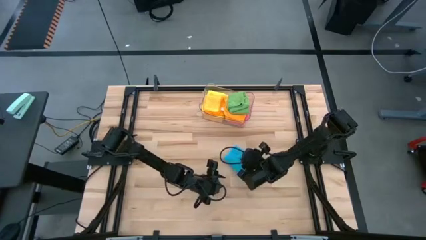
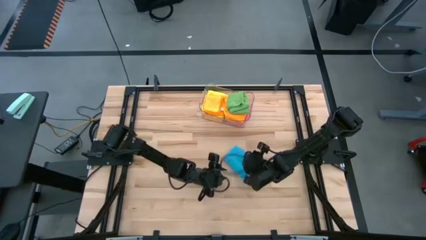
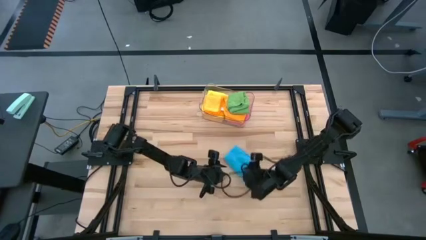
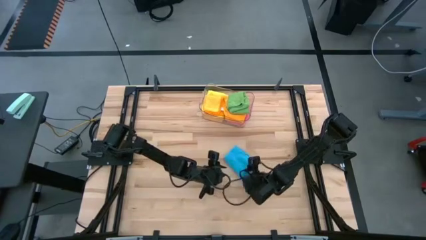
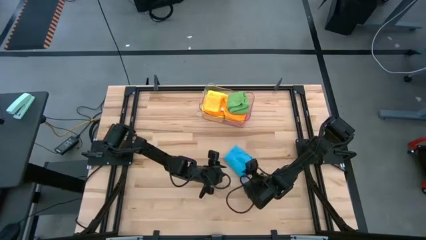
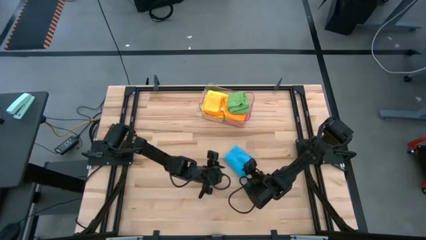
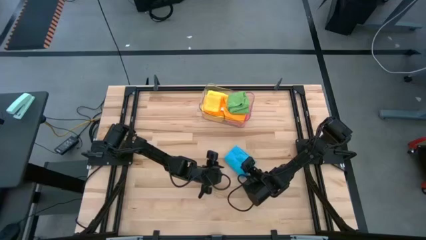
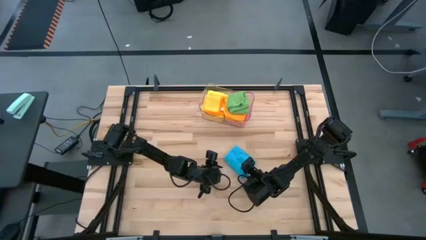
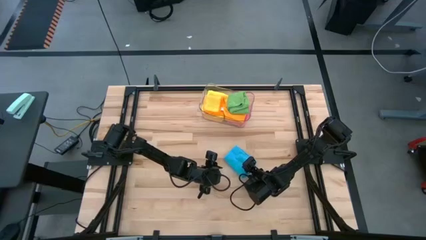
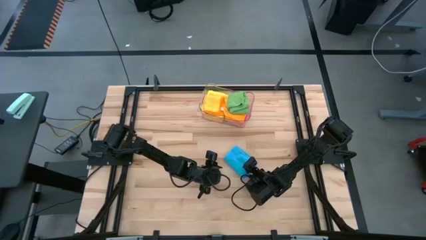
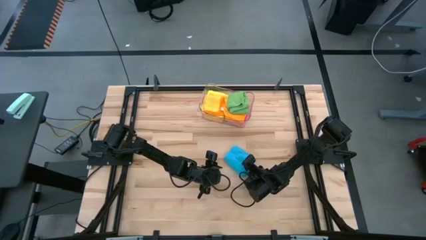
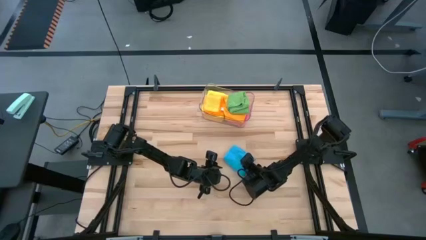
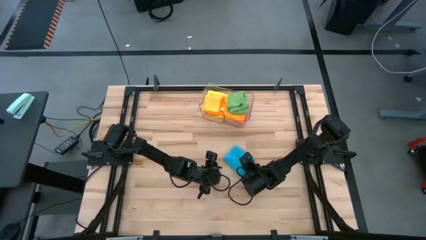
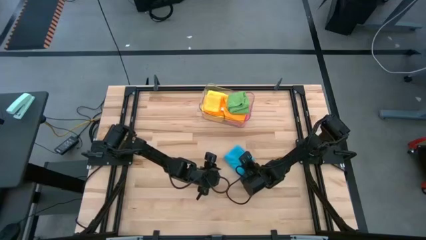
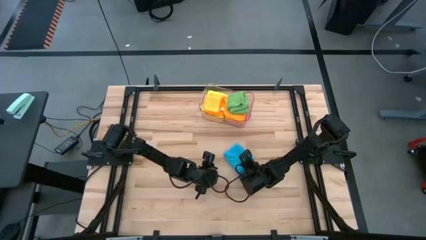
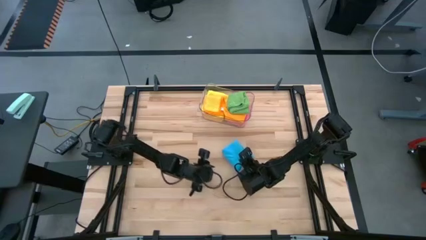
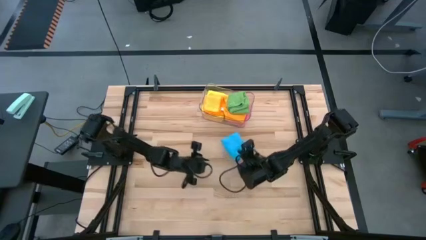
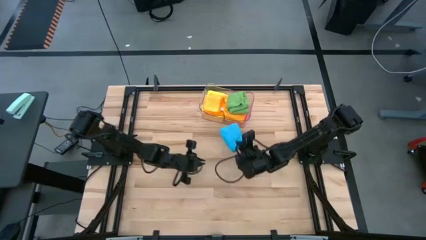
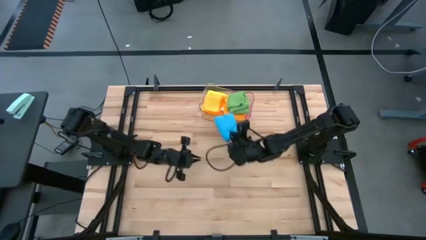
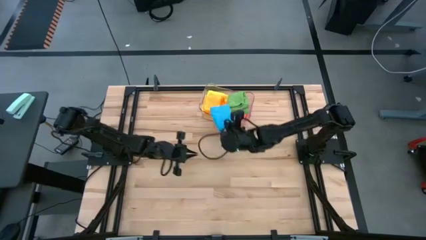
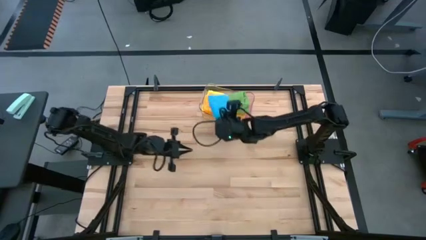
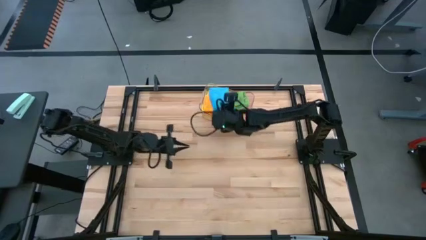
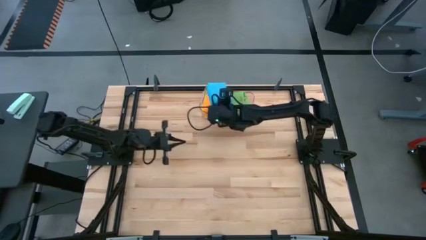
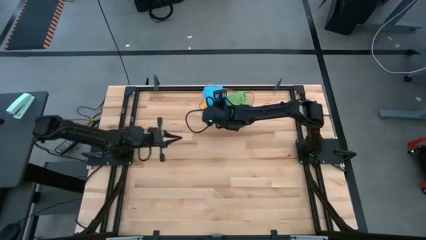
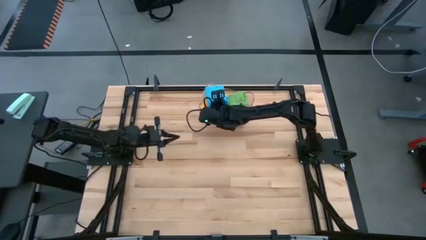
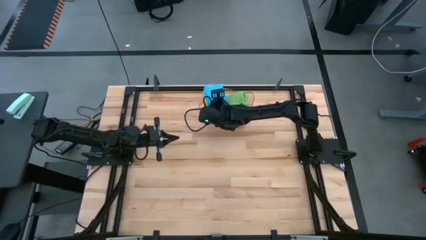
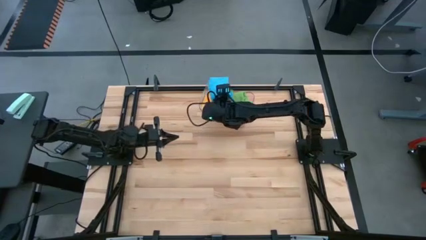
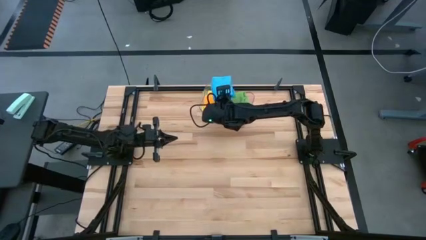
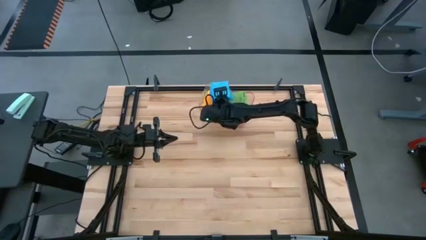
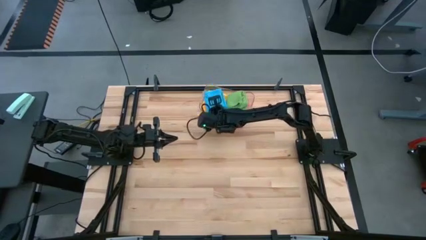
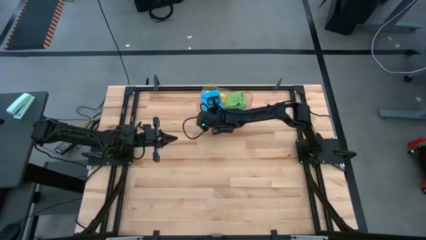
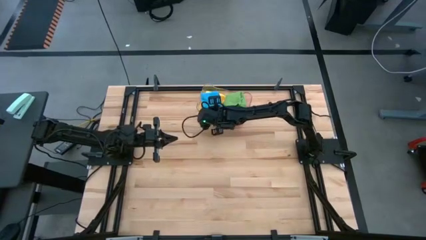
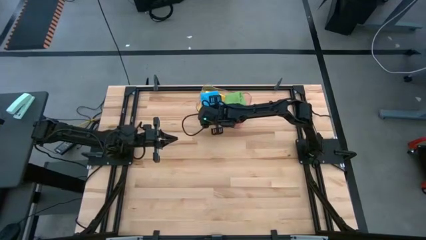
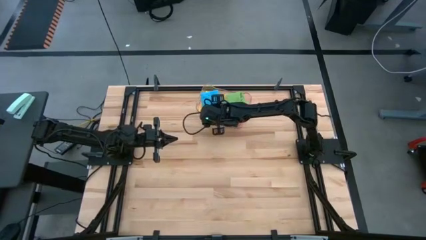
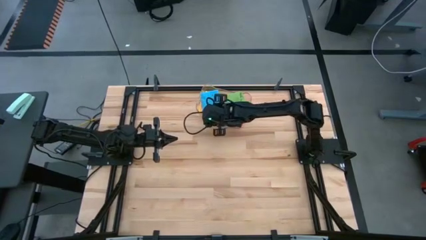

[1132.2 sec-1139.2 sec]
Task: Fold microfiber towels
Put the blue microfiber into the transparent bin

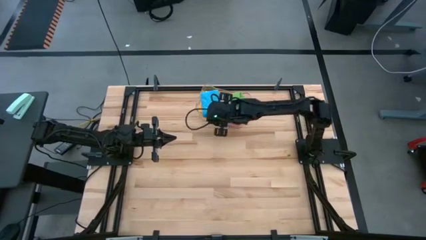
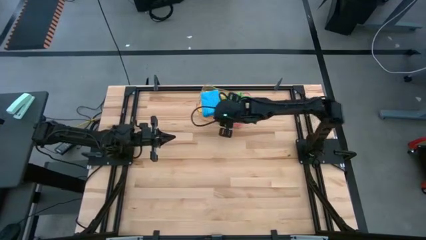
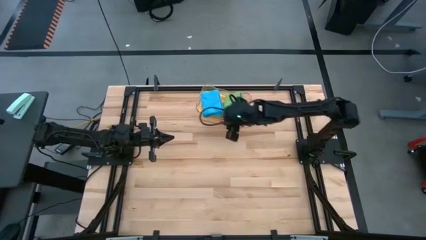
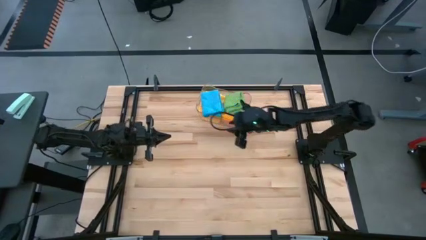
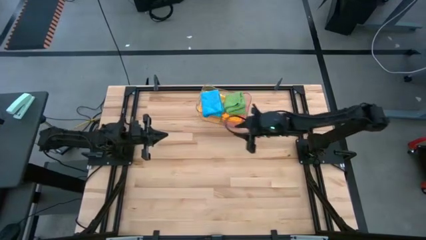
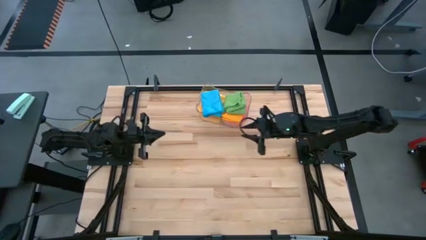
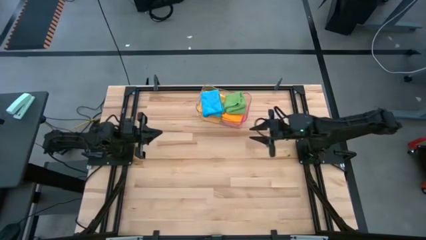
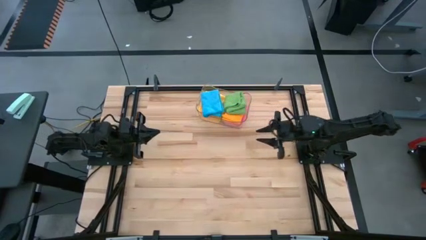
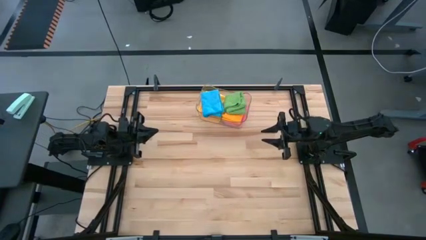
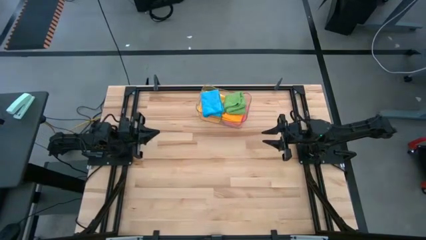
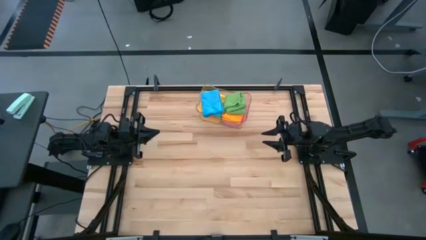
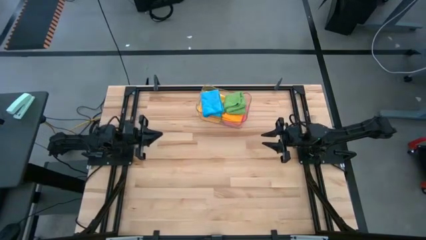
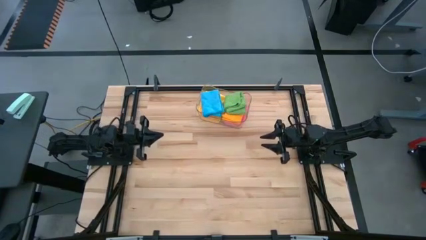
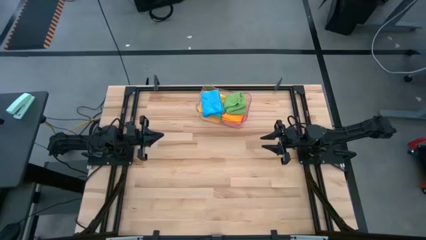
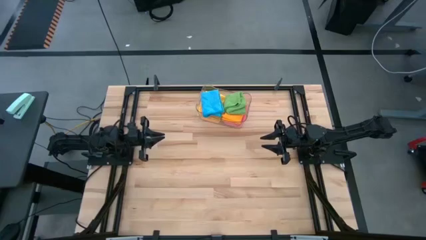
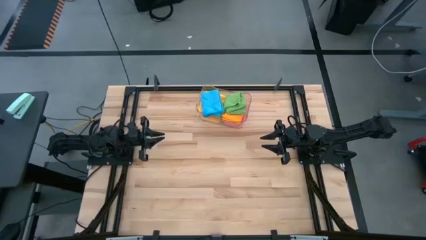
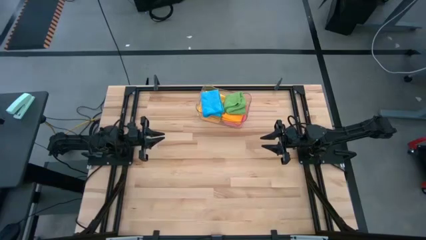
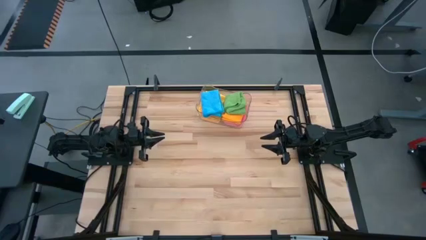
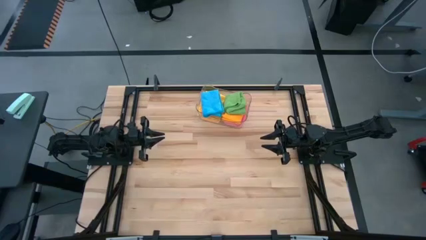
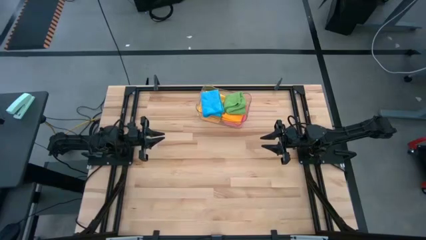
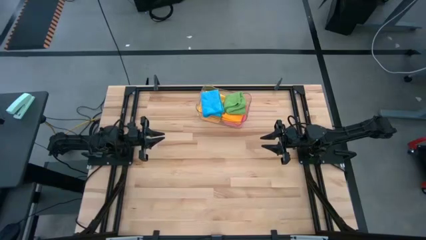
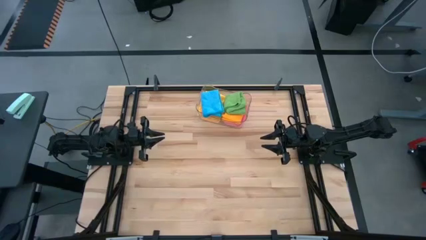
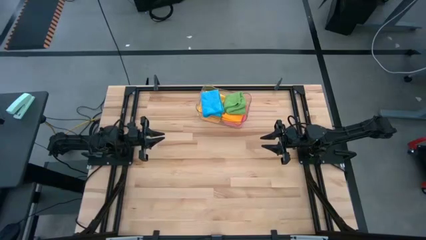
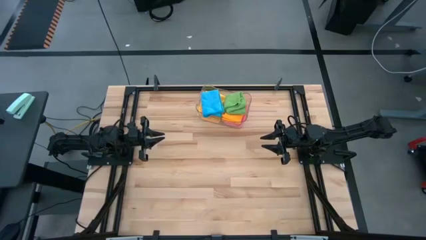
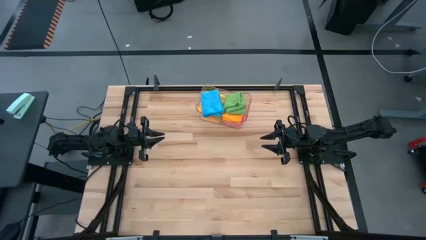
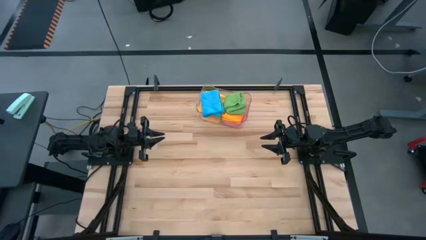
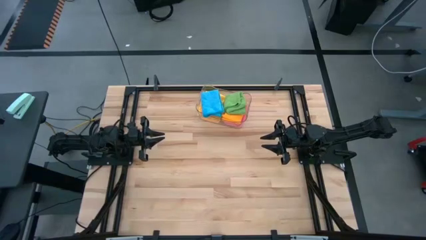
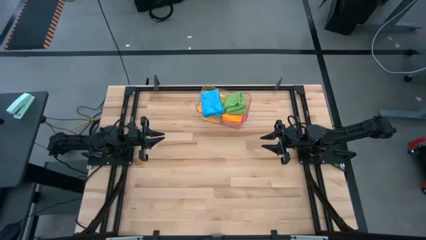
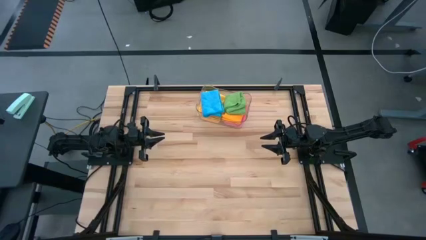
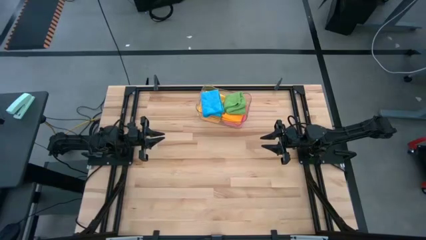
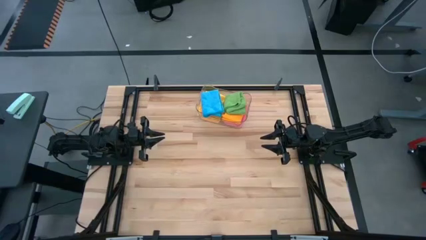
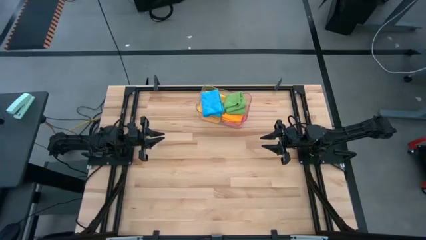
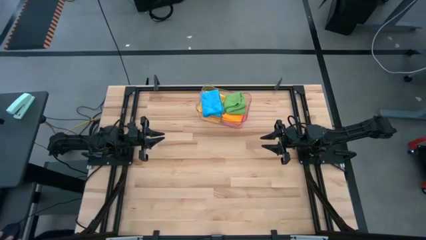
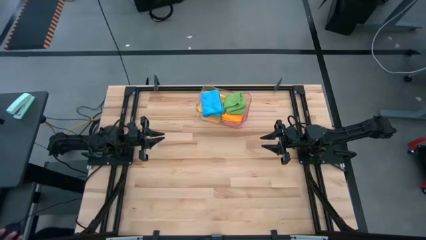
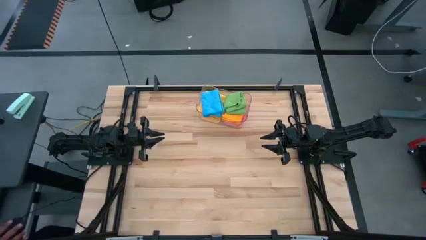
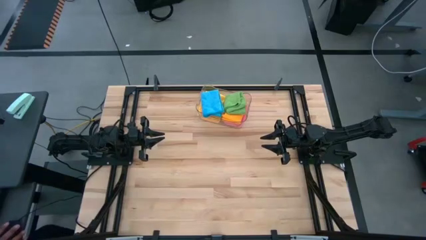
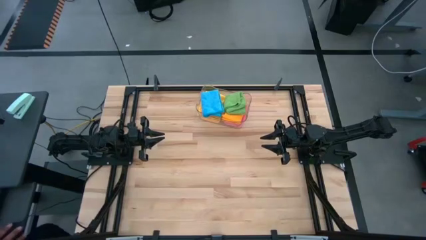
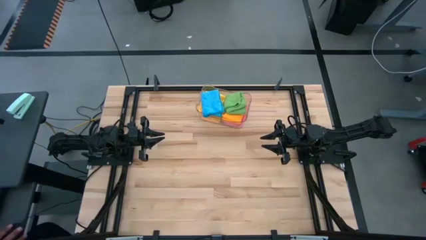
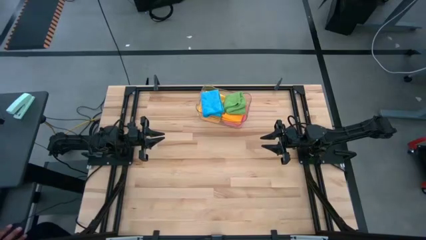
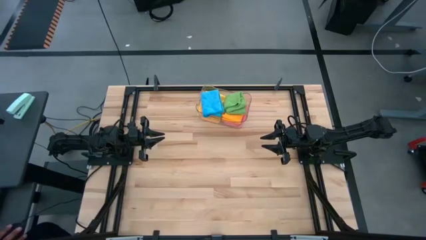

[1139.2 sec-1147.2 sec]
Return to Home Position
